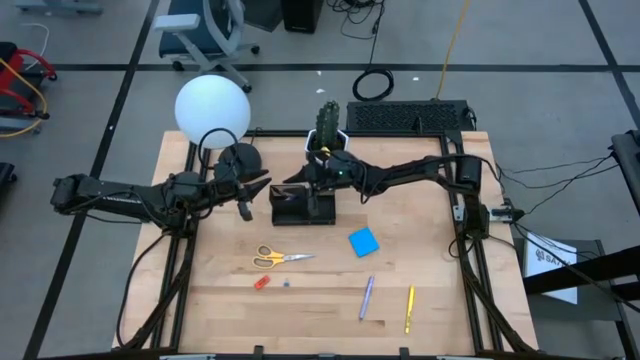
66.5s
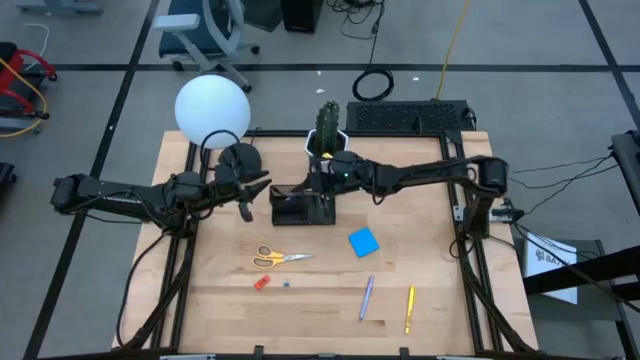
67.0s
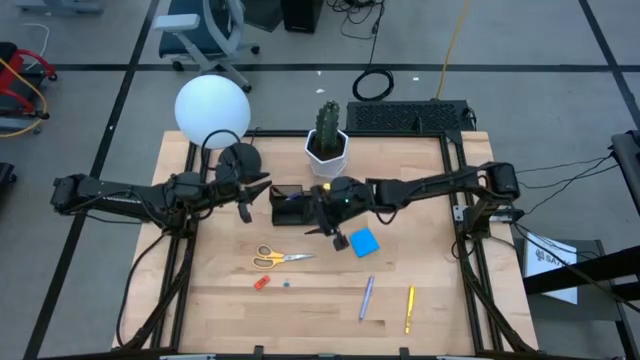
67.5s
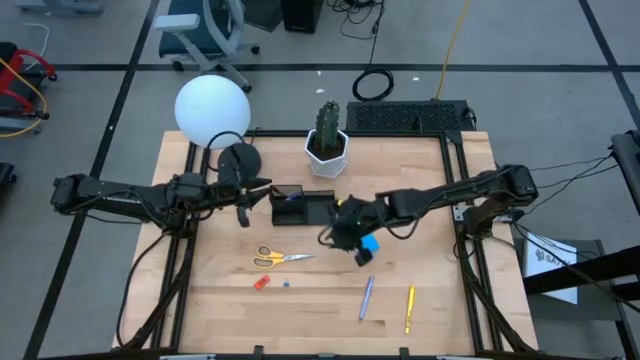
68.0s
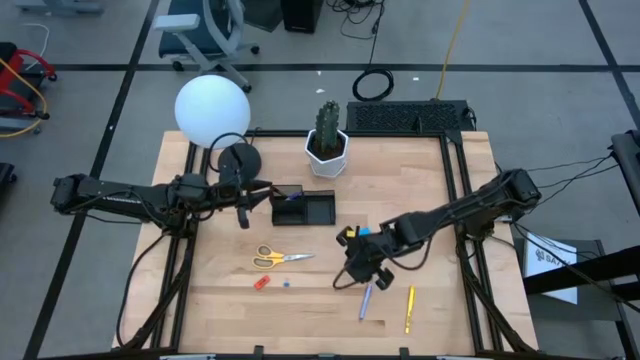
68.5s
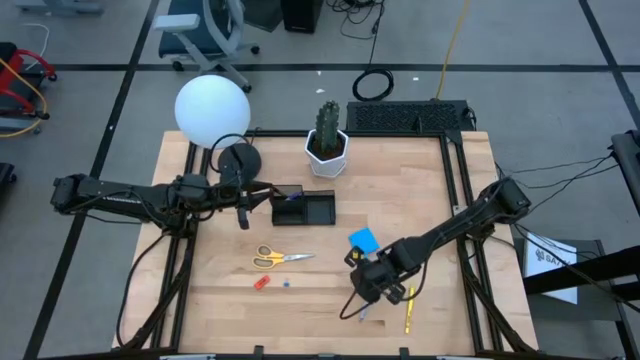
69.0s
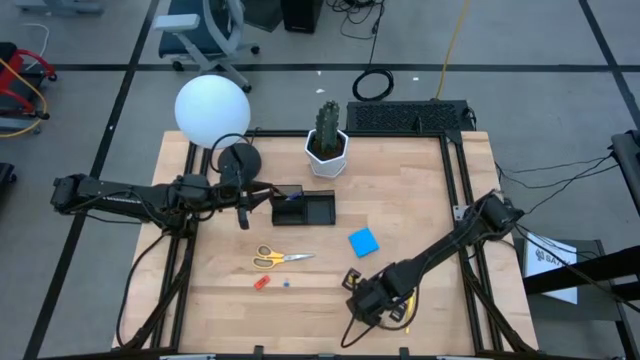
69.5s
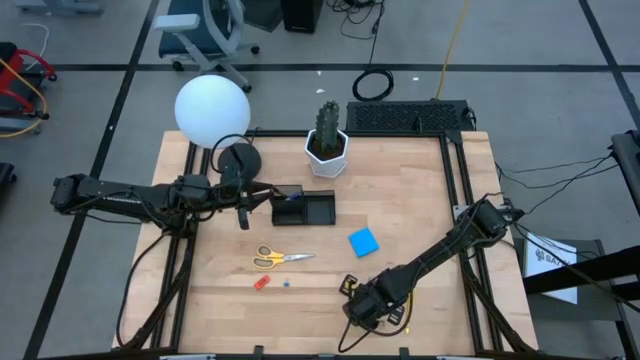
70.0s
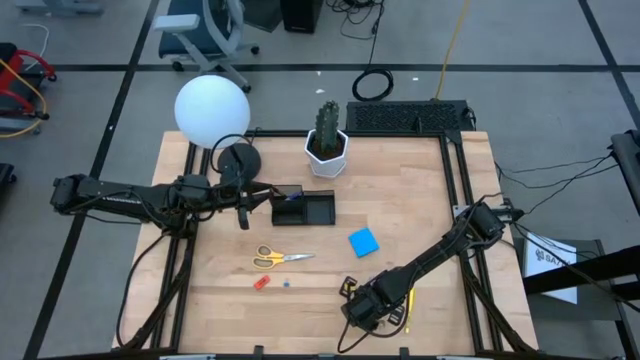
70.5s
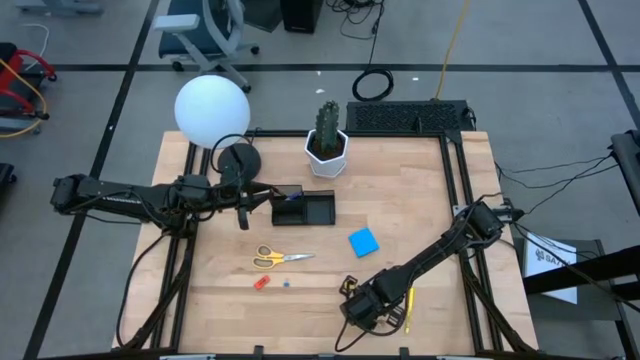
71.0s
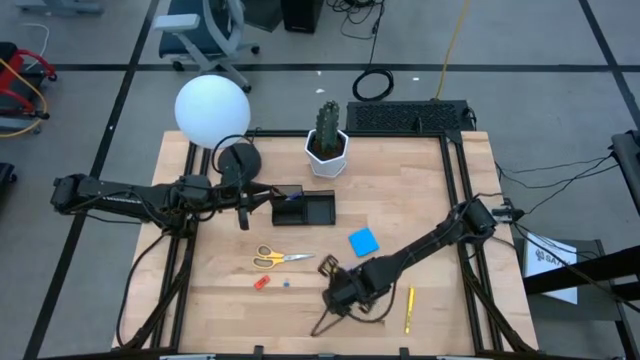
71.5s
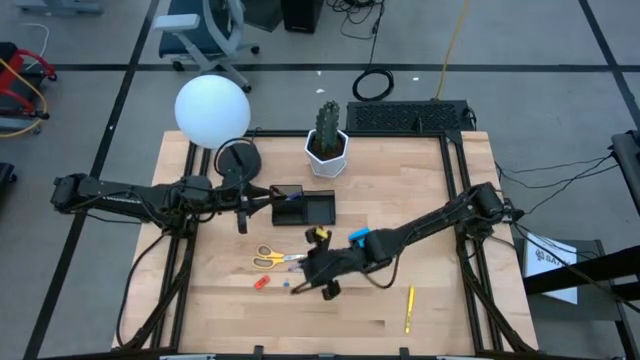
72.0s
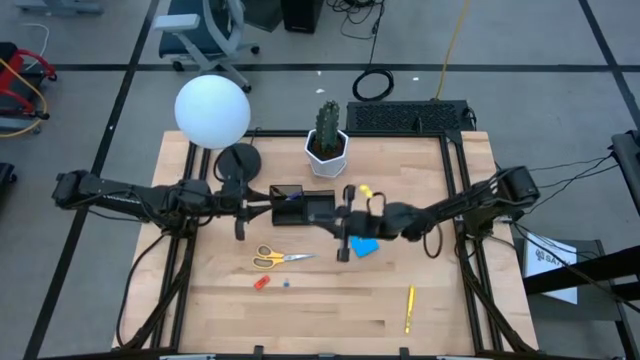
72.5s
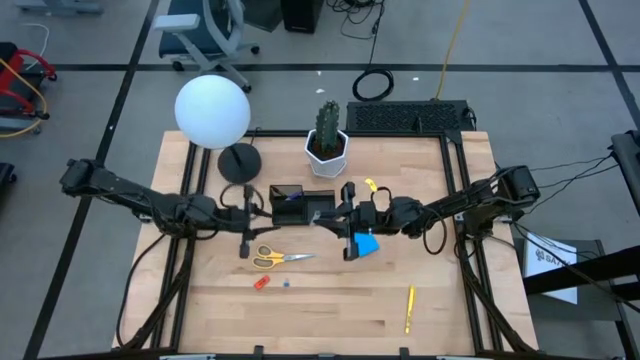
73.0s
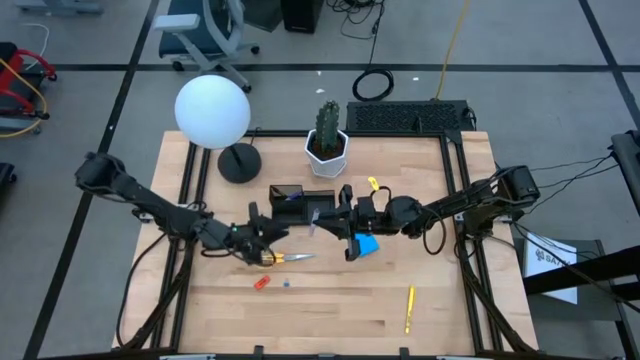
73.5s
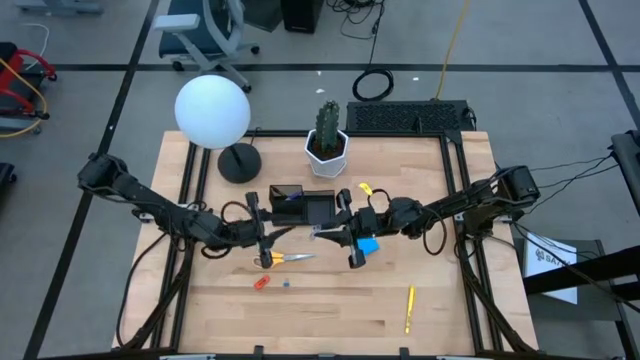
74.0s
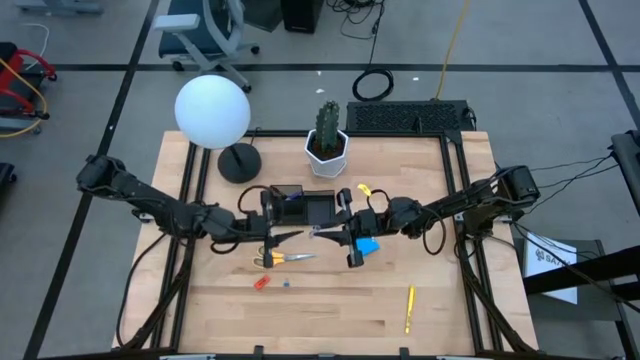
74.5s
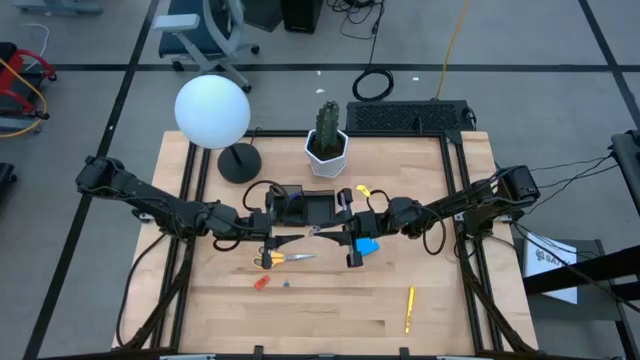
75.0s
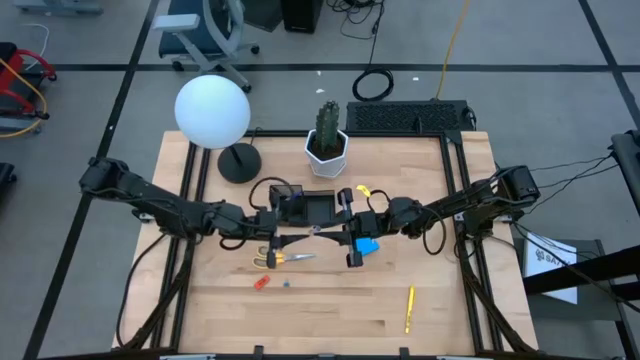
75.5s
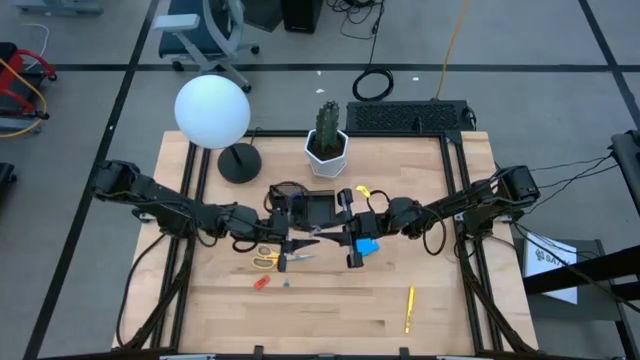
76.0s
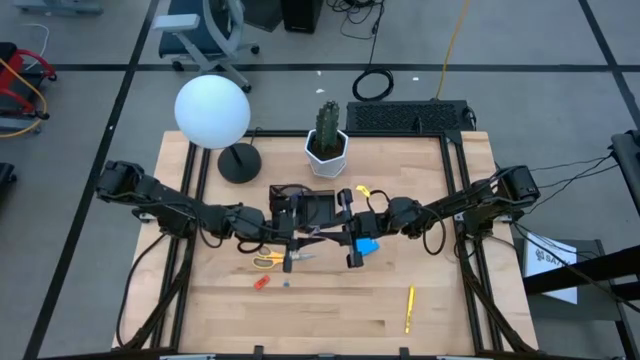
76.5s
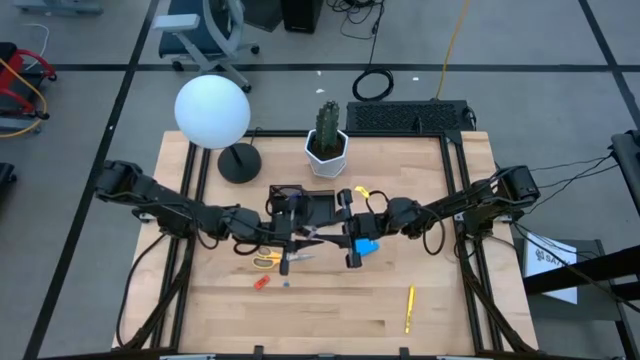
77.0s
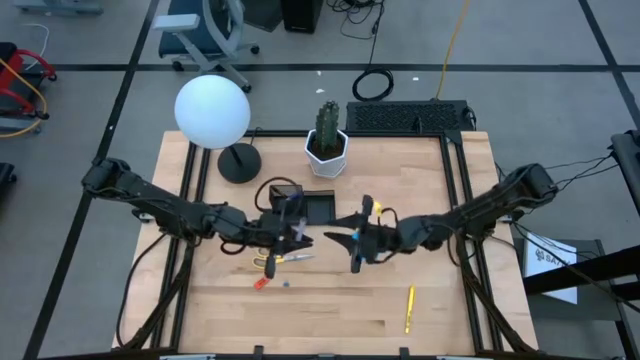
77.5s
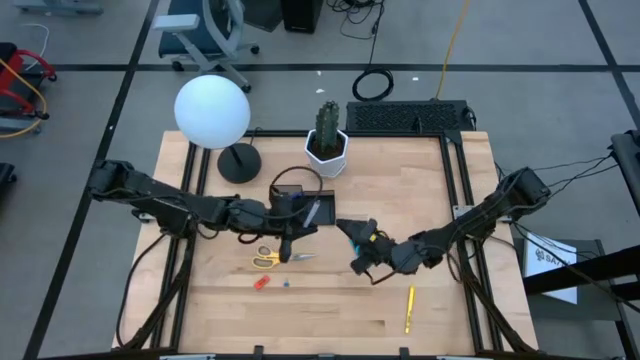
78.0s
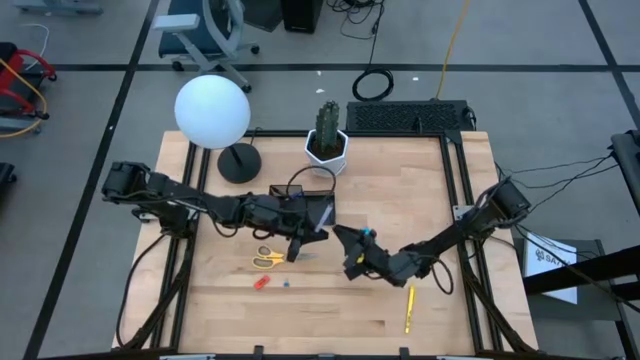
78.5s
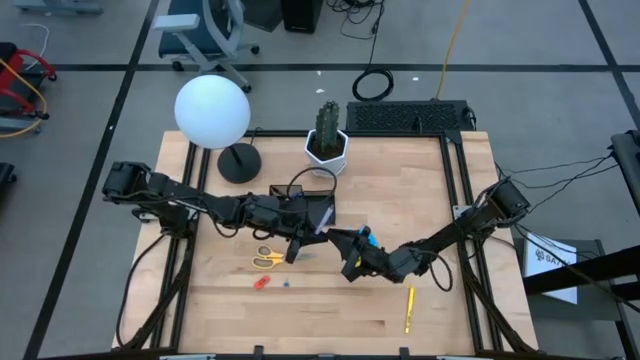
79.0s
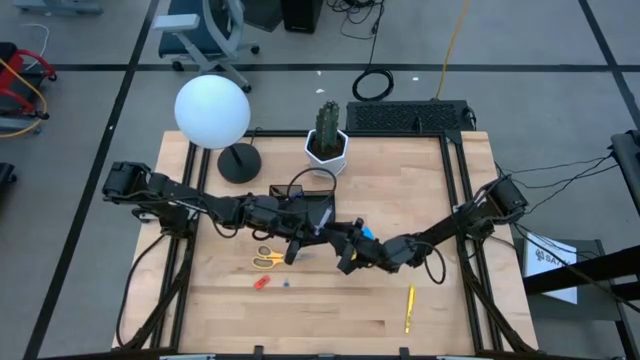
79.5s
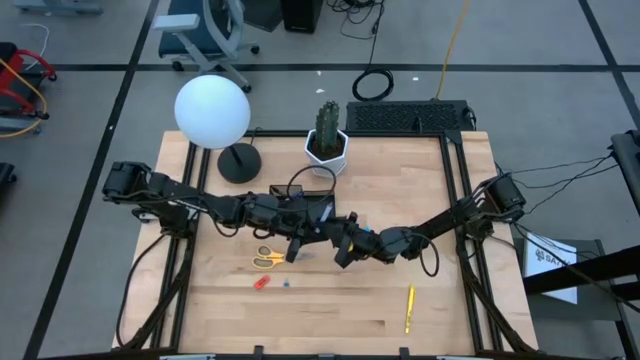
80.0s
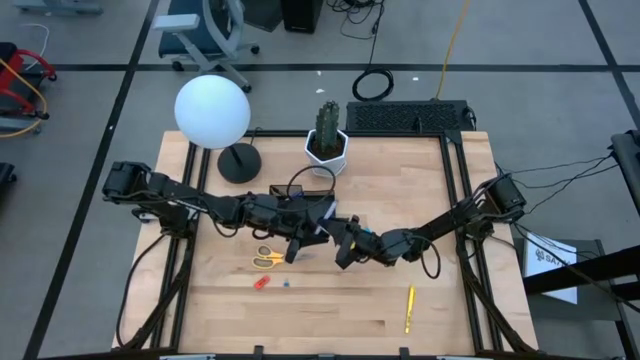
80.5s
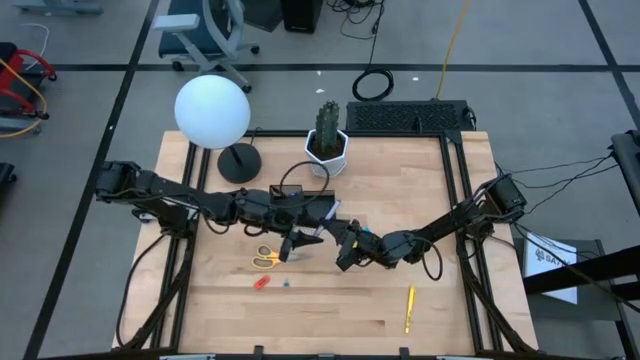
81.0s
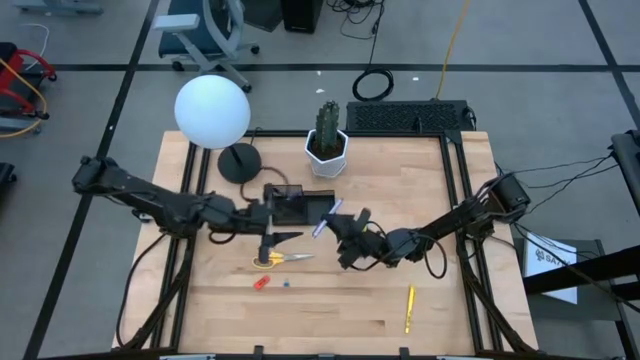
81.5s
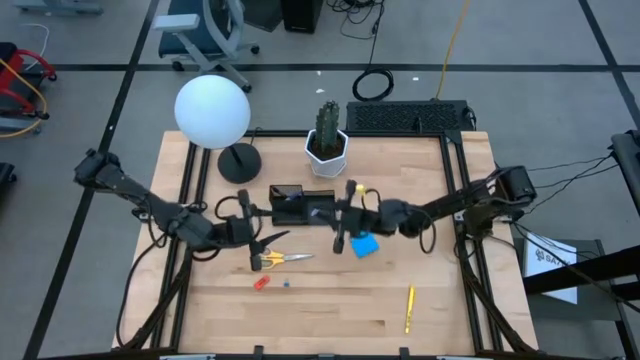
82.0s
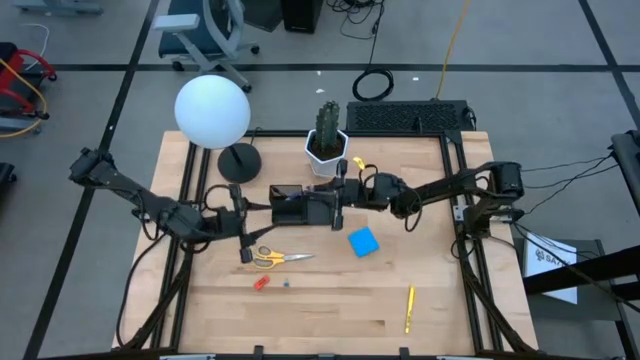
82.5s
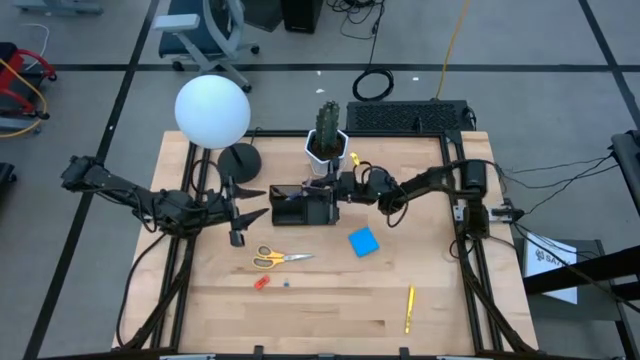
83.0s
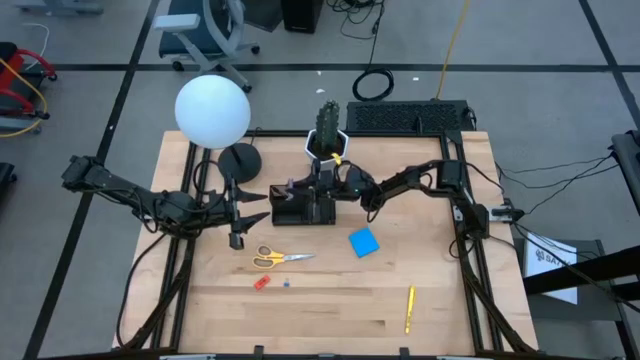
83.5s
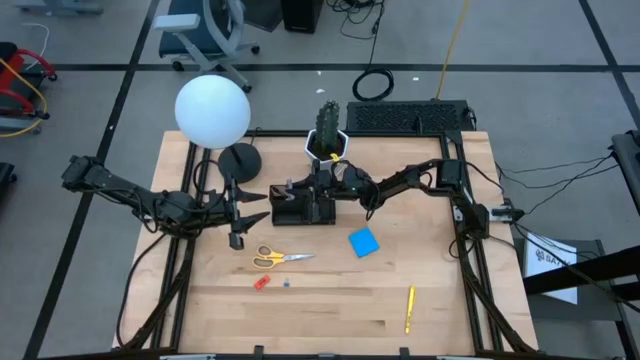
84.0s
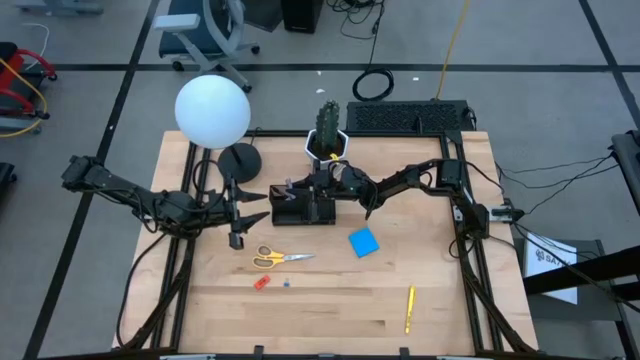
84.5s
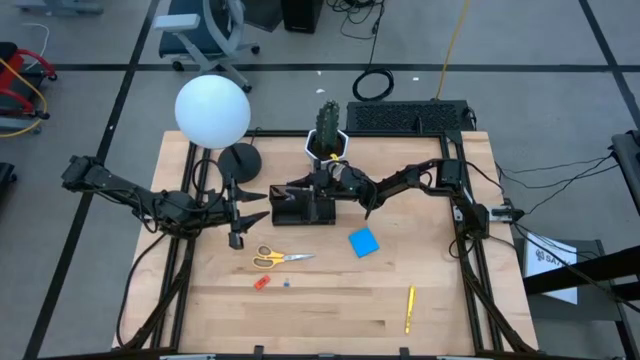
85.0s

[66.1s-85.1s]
Task: Pick and place office supplies into organizer
Put the purple pen into the desk organizer

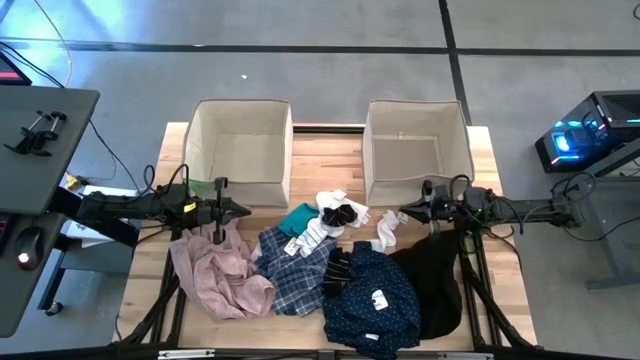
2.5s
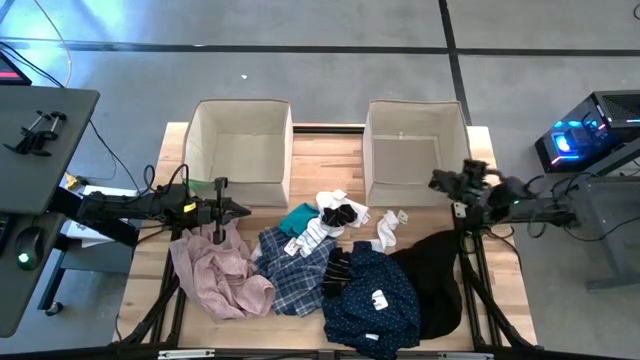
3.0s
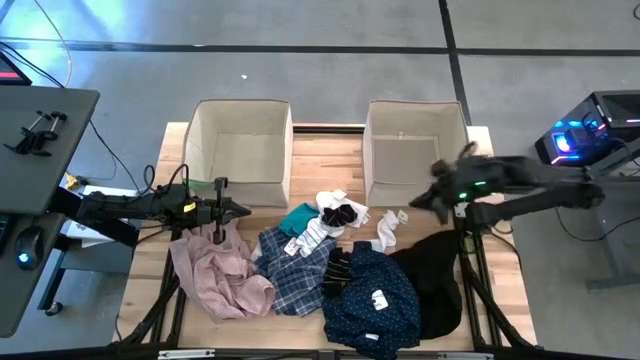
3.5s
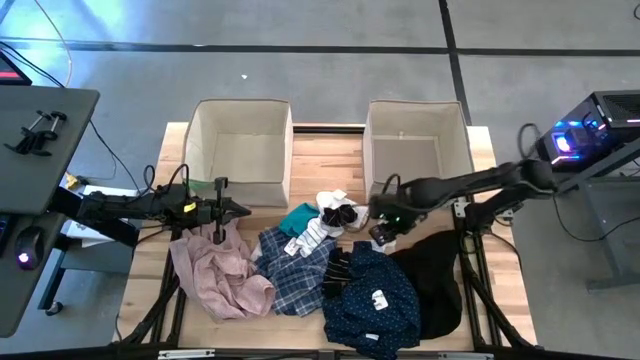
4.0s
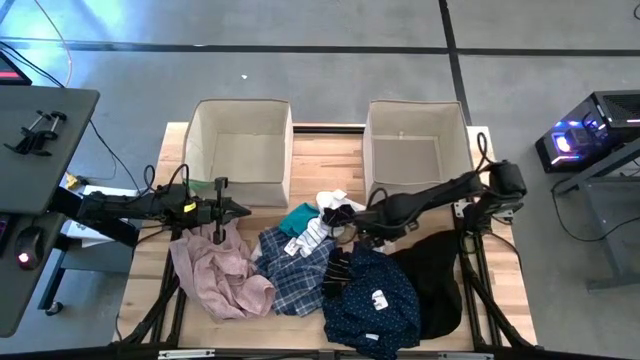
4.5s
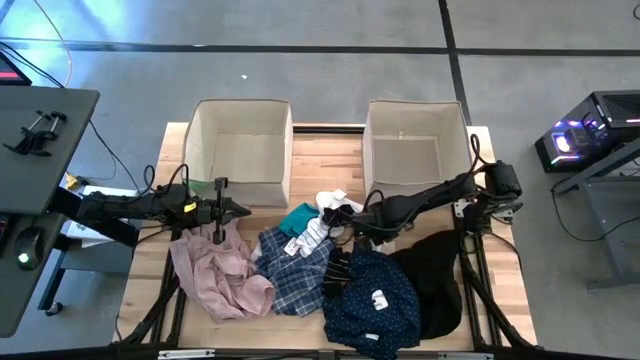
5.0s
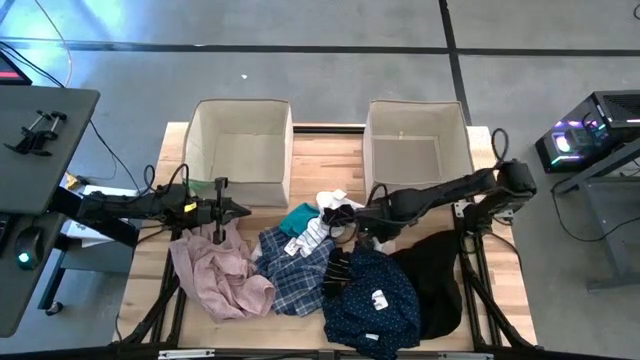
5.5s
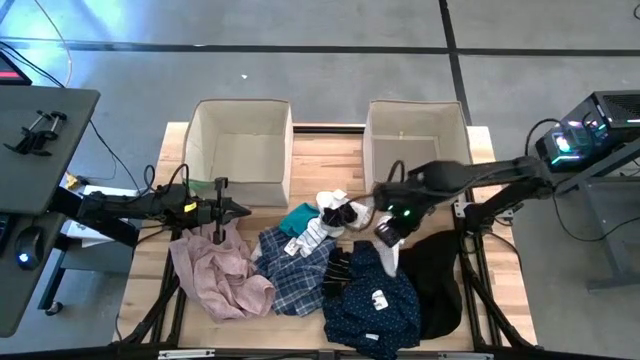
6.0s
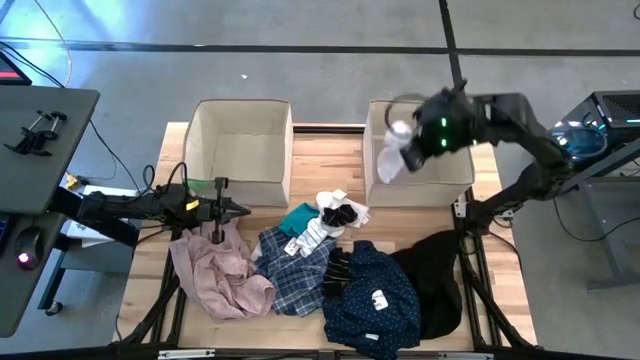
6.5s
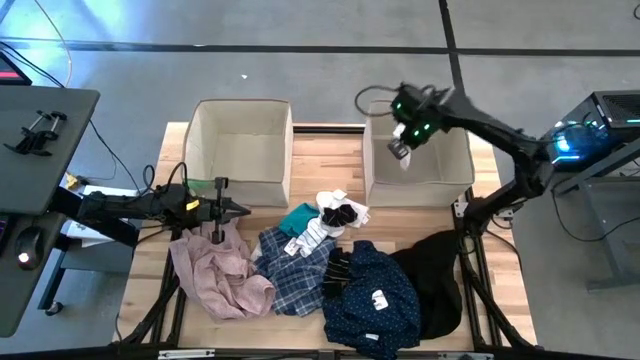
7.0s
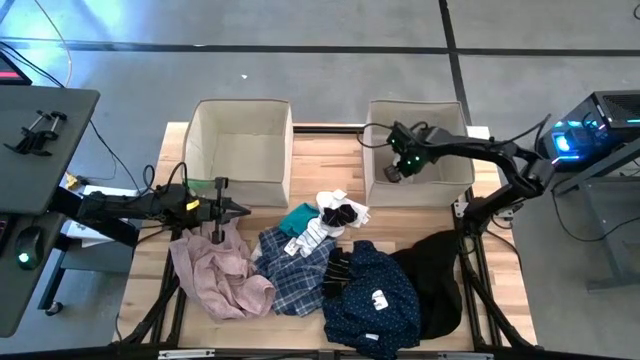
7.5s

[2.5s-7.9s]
Task: Sort clothes
Put the white sock into the right laundry organizer
